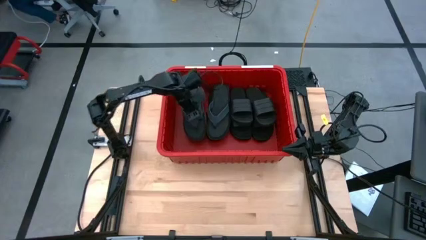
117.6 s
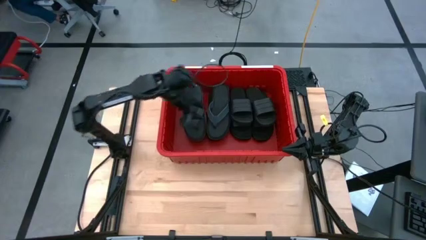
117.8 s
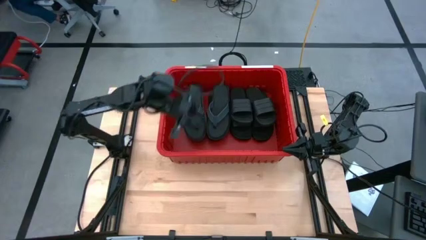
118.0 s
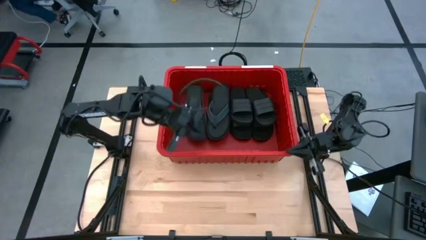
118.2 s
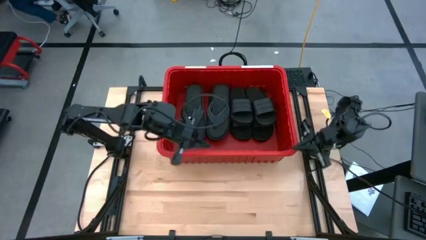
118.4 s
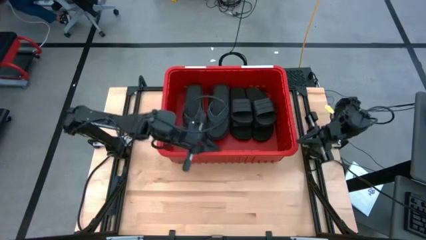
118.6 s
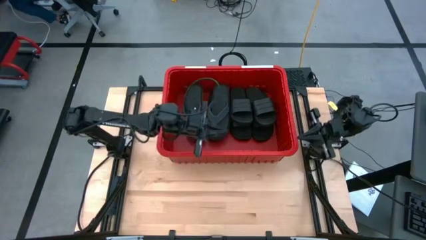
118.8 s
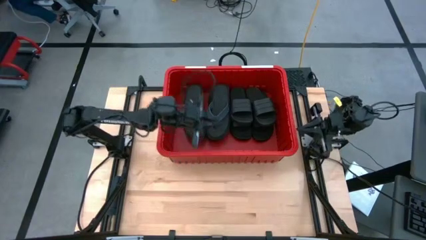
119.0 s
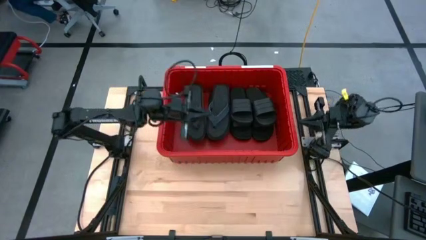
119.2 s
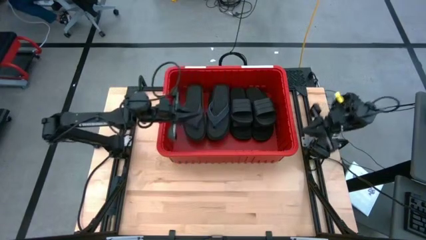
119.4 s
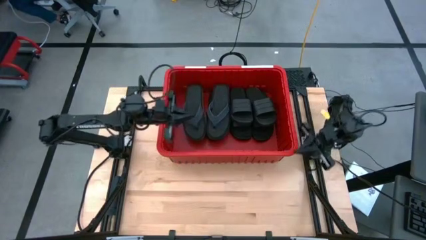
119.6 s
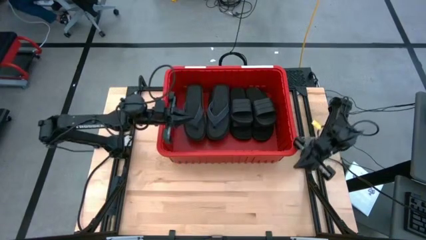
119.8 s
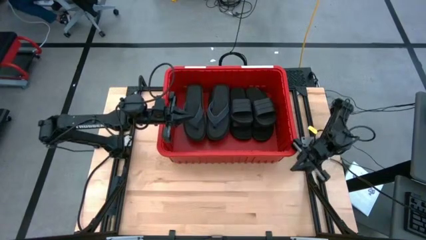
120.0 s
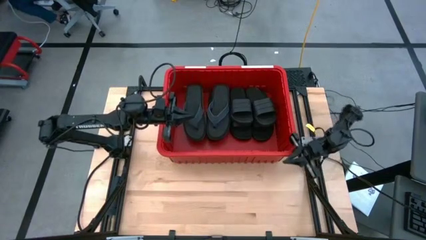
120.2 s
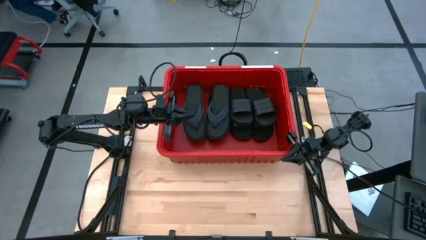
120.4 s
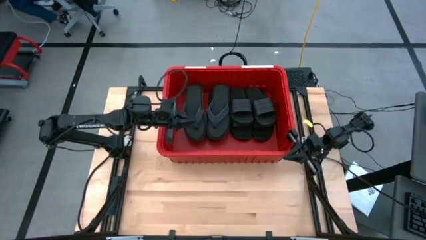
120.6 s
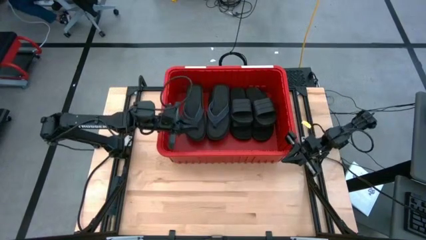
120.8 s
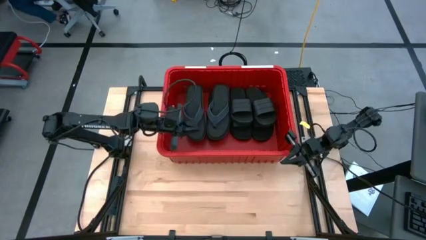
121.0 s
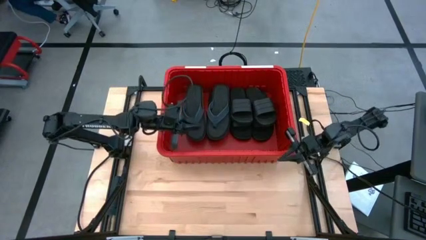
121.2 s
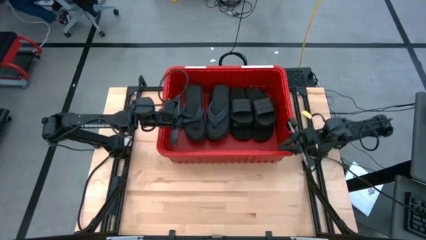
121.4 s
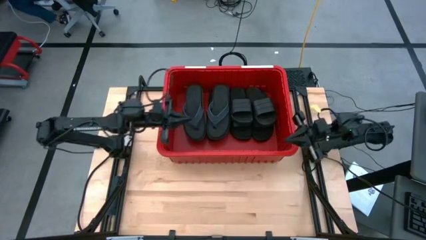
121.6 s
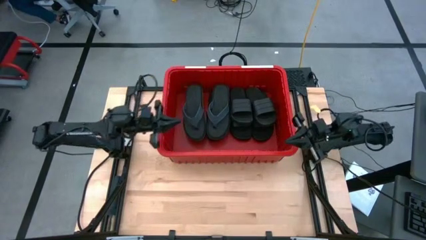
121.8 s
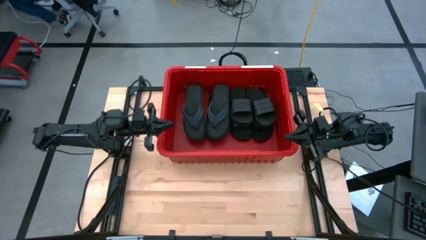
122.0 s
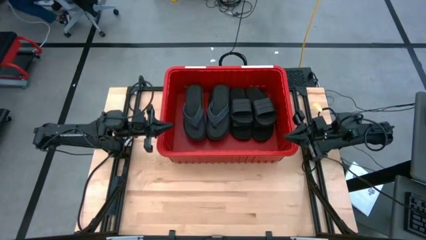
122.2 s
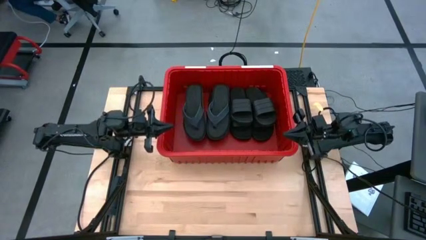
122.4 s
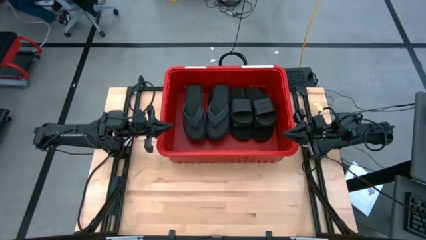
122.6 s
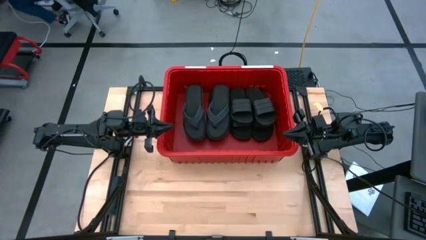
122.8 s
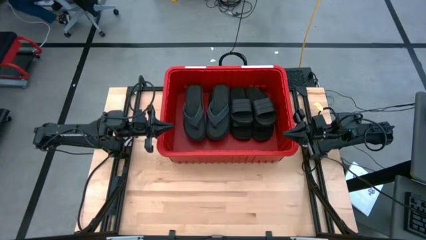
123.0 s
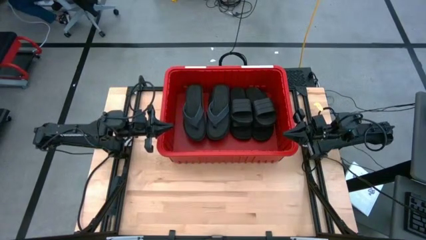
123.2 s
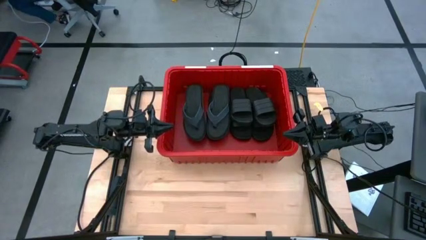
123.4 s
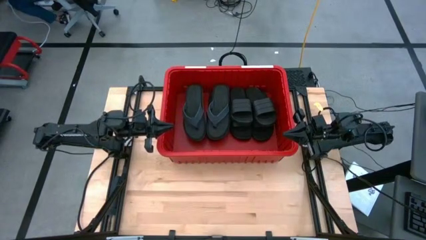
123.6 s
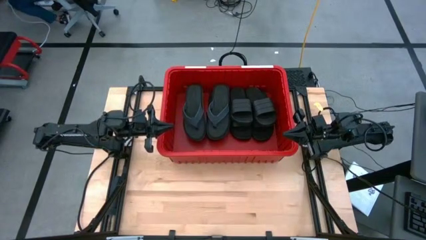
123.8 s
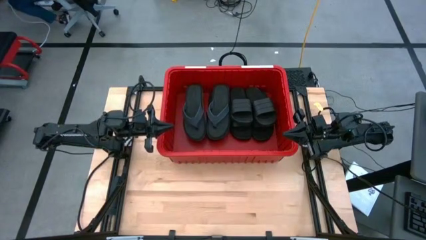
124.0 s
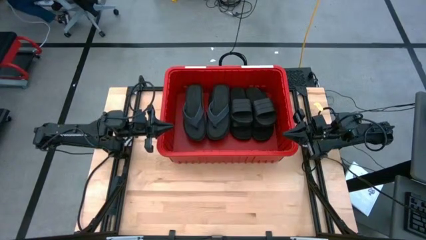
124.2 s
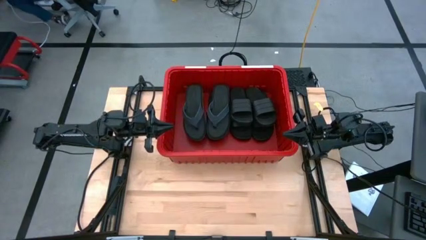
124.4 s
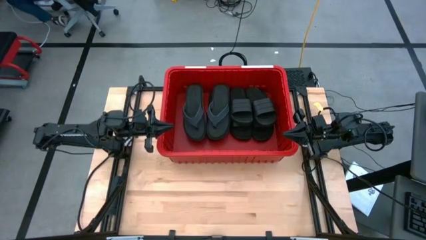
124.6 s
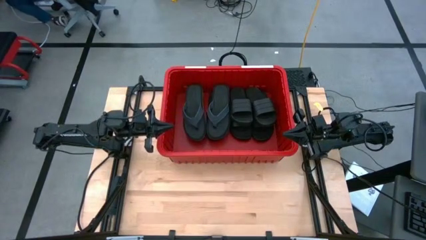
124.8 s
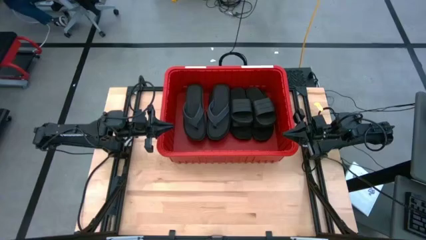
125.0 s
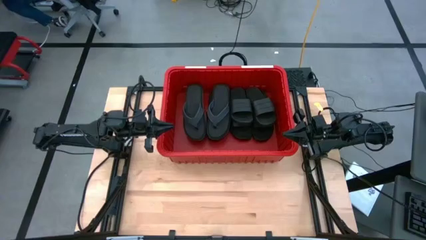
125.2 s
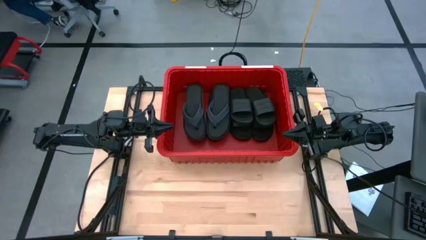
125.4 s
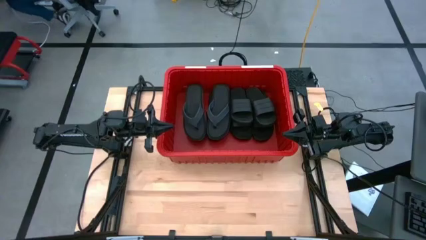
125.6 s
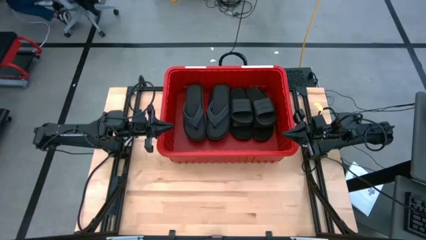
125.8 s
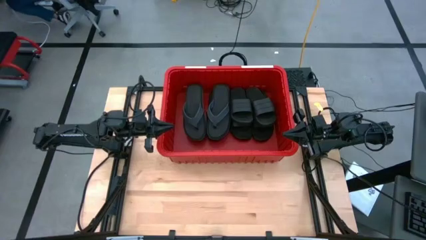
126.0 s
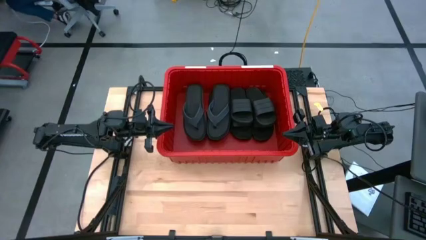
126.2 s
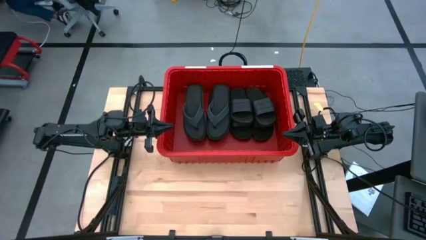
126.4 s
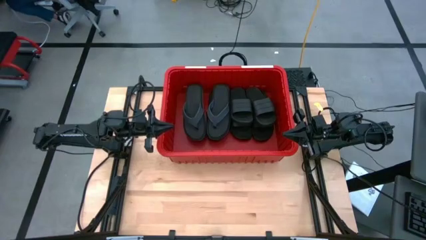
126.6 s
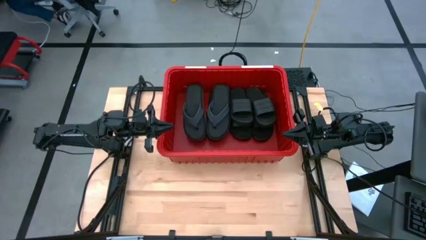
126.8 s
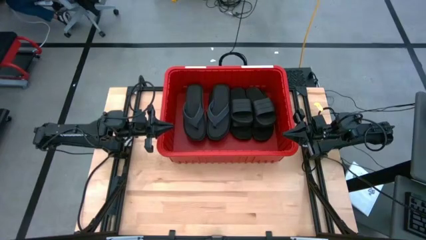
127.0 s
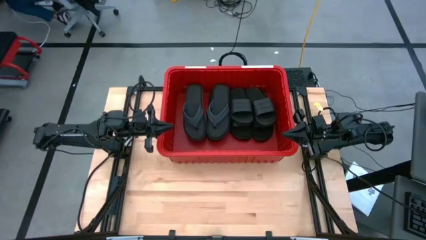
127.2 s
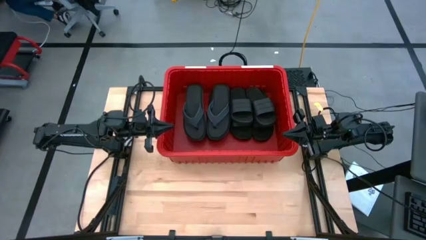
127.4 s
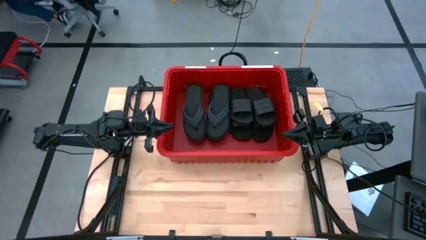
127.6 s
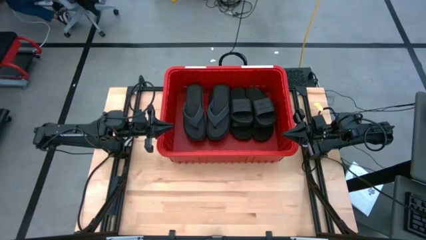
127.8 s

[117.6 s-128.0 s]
Task: Pick and place slides into bin
Return to Home Position
